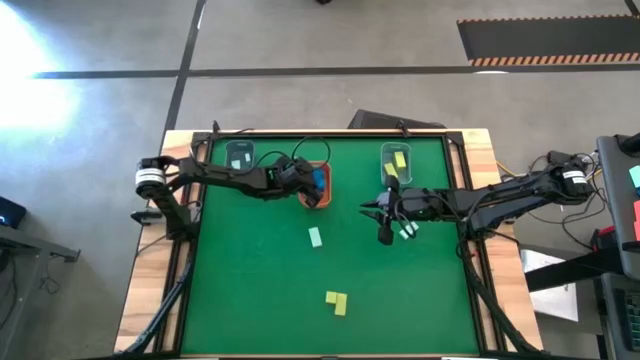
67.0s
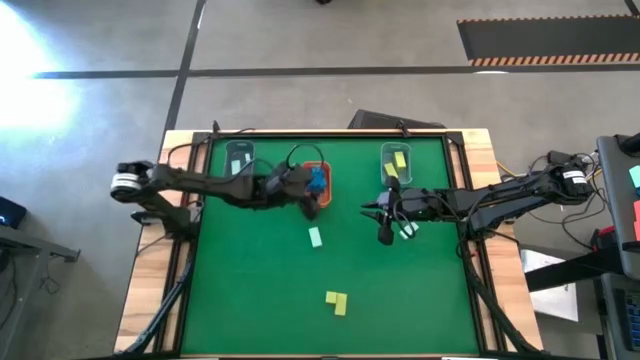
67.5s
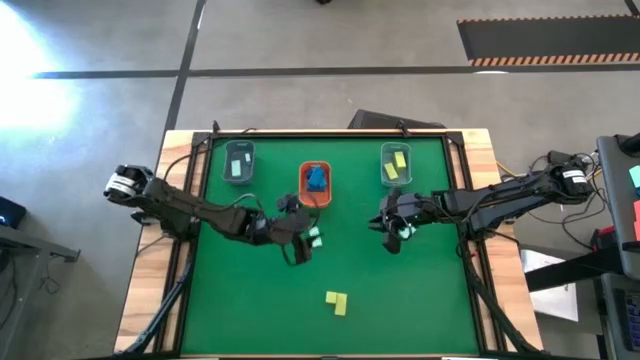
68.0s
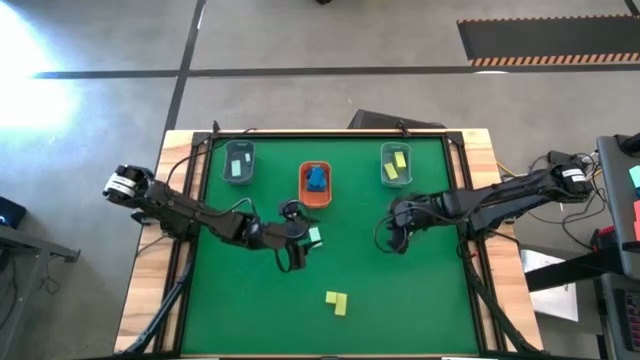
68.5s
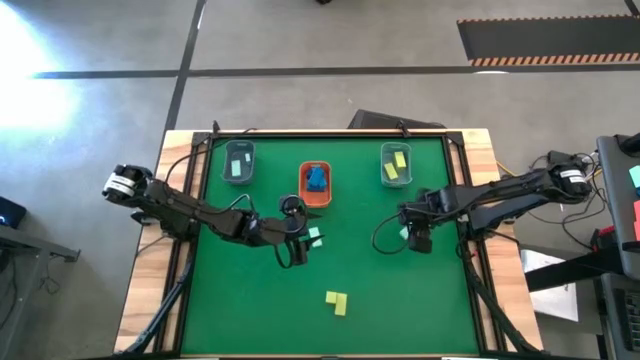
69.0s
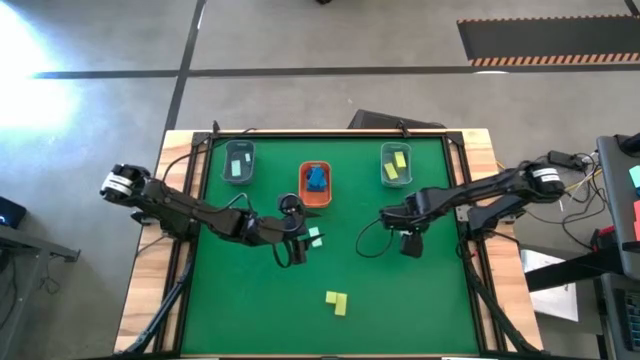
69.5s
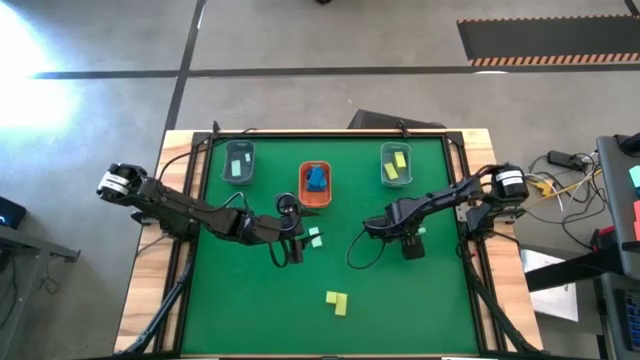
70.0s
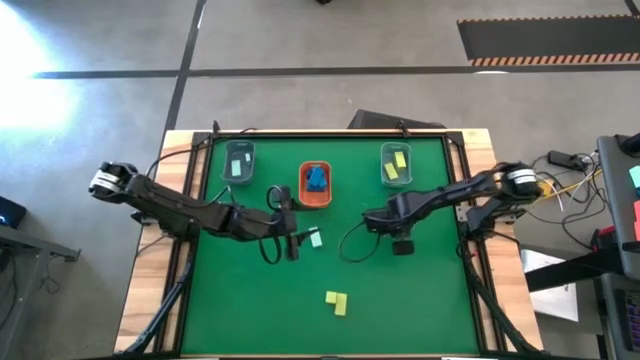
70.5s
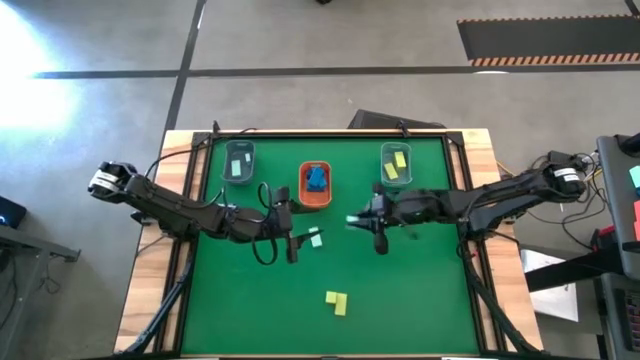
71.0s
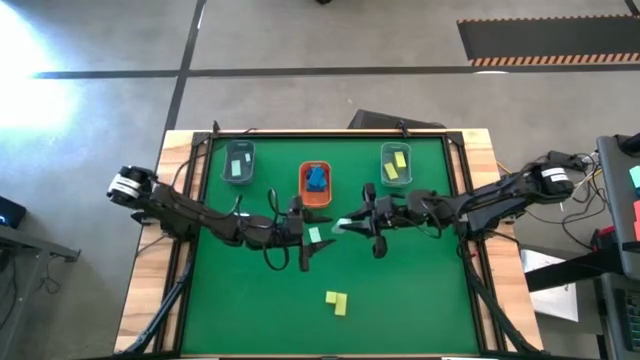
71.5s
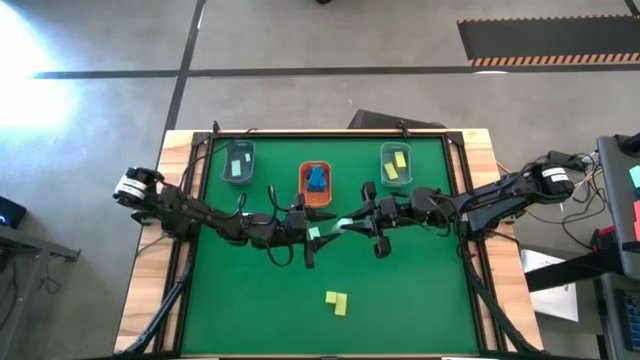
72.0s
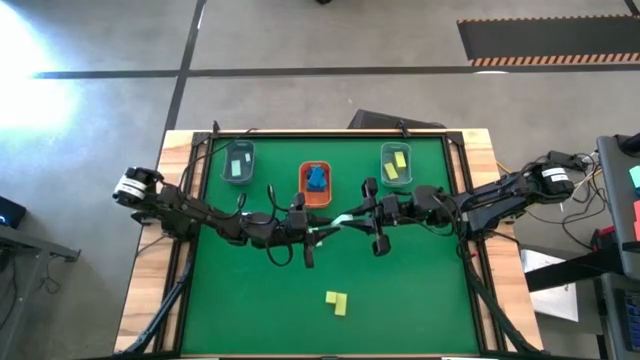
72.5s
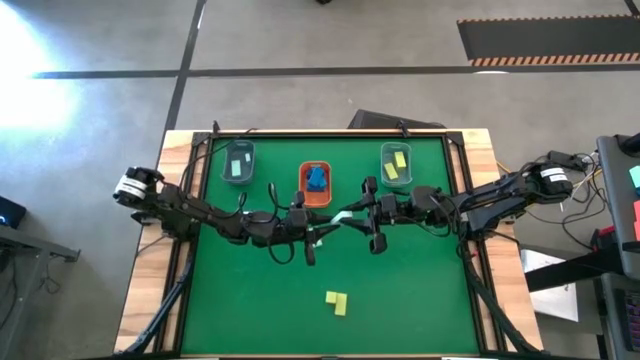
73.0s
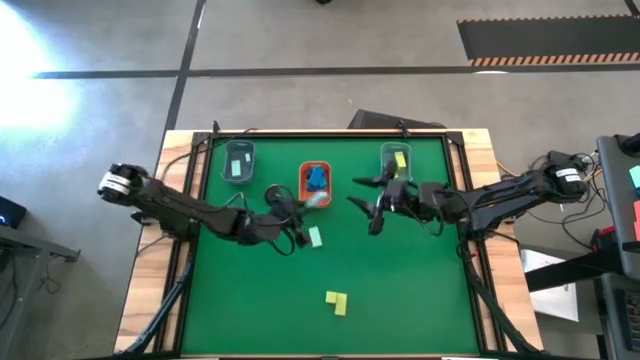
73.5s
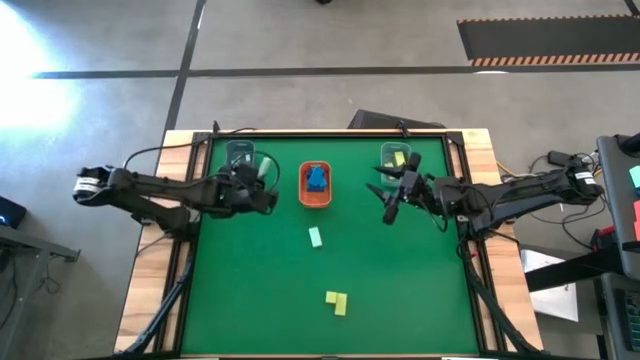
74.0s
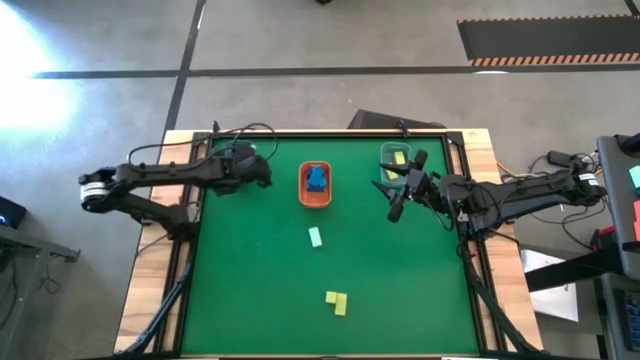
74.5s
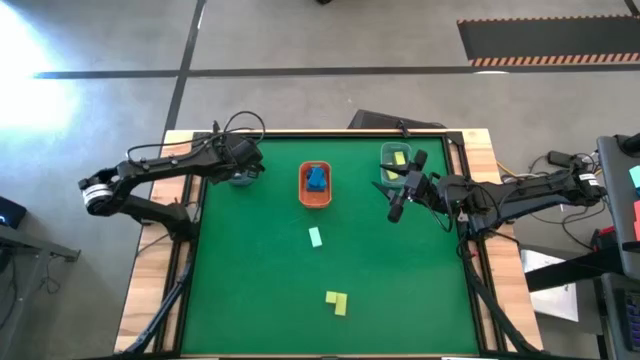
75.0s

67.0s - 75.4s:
Task: Sort & place blocks by color
Put the light blue wooden block into the gray bin

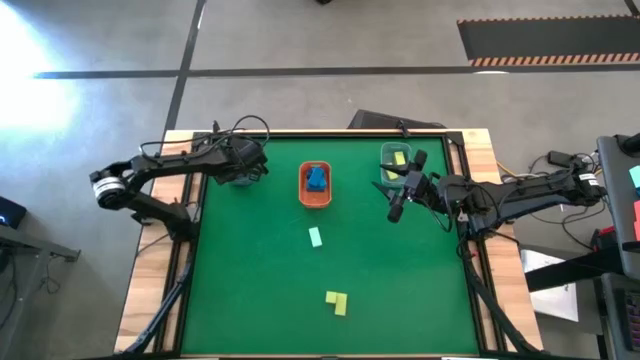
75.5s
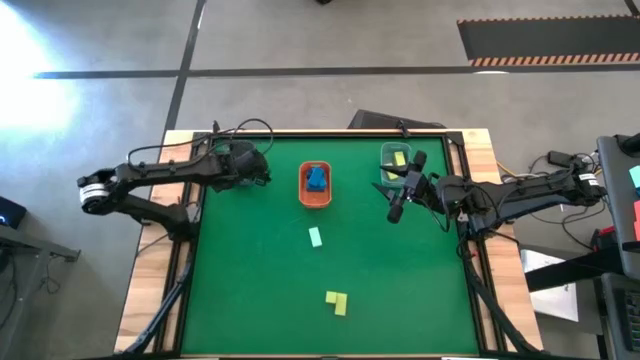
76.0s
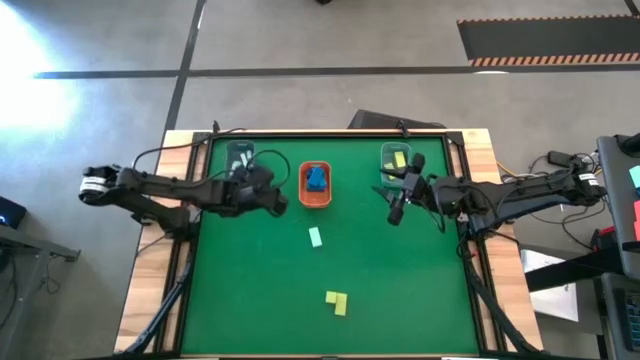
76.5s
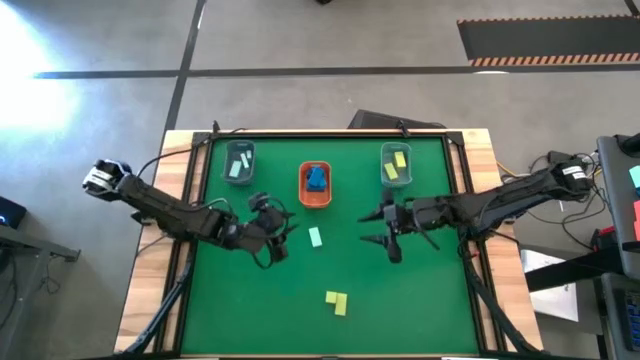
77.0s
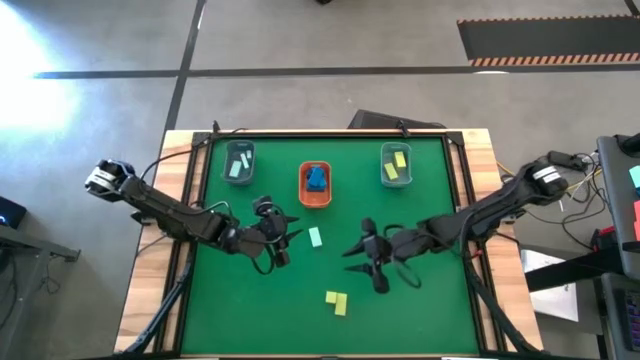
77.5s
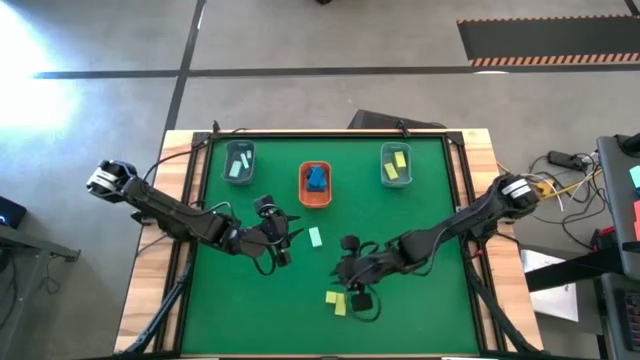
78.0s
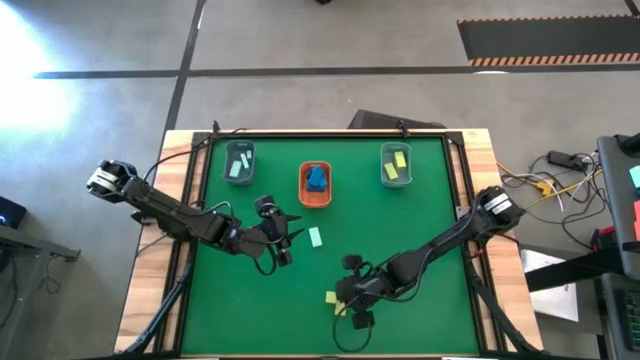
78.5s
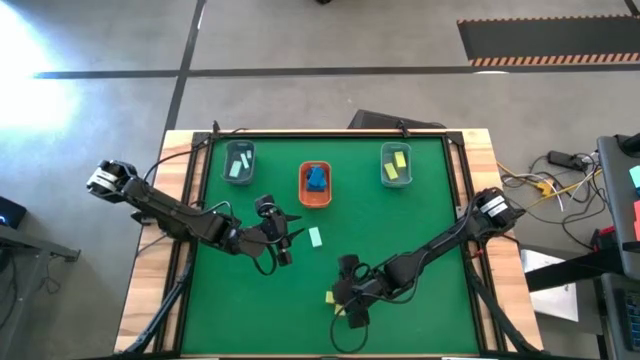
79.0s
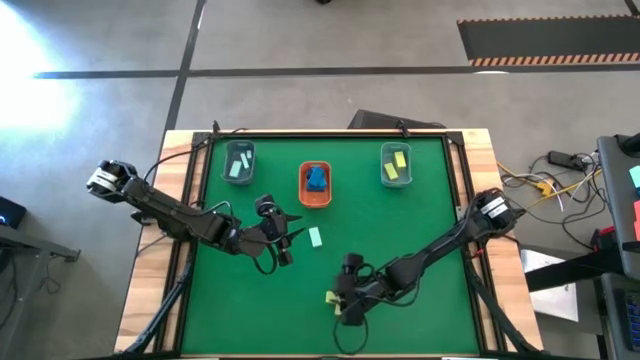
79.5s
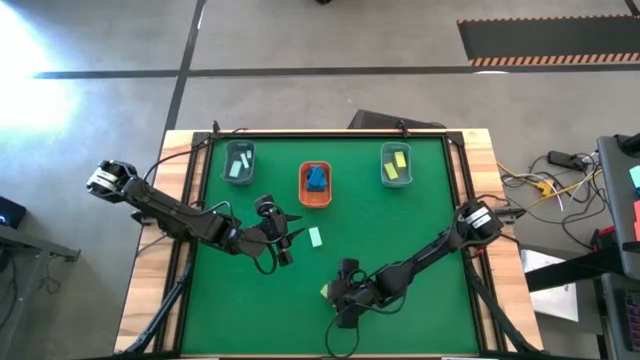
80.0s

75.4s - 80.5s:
Put the yellow wooden block into the green bin

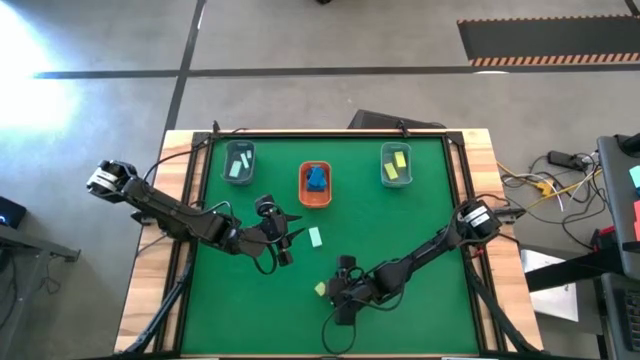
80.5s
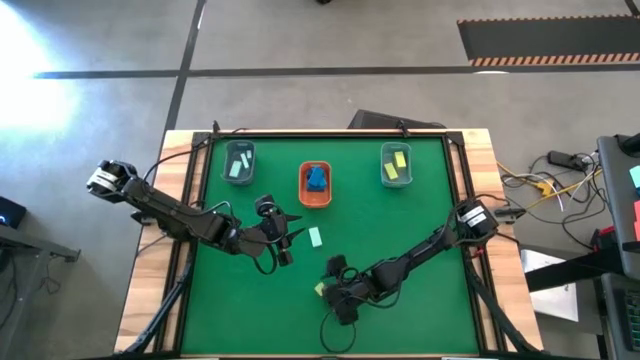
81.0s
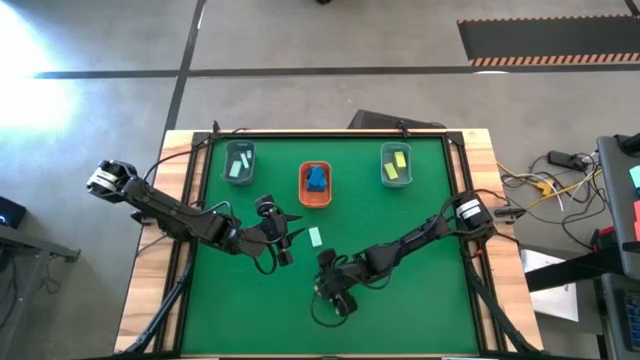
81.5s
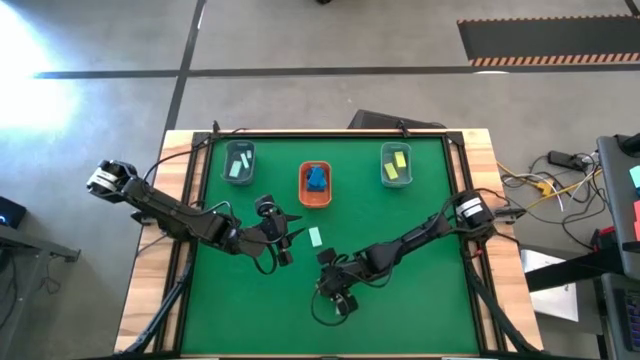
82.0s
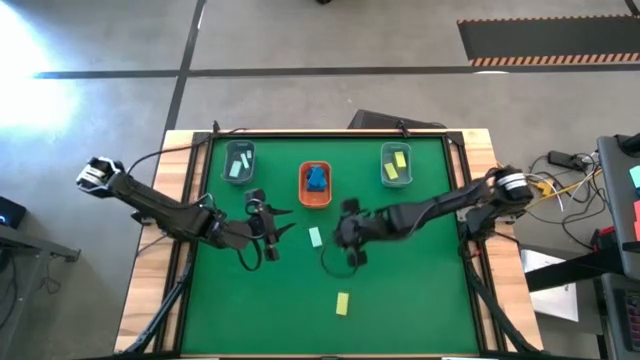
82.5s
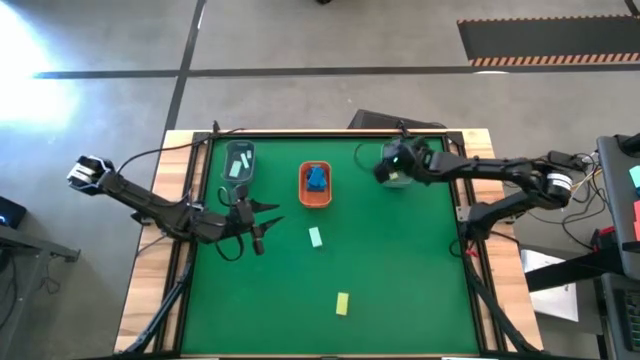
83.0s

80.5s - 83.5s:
Put the yellow wooden block into the green bin

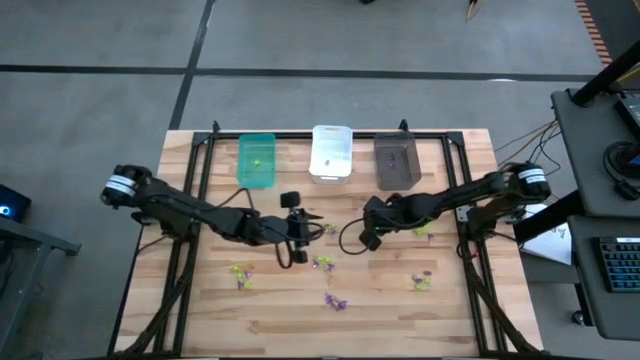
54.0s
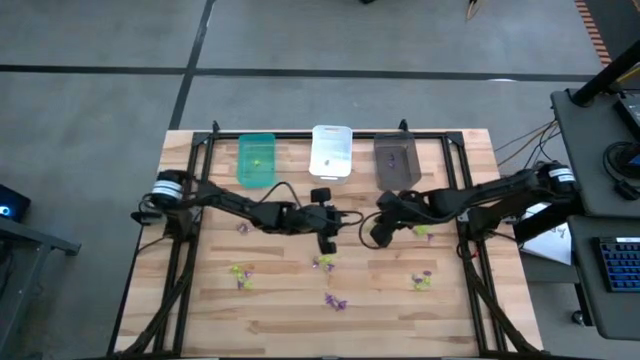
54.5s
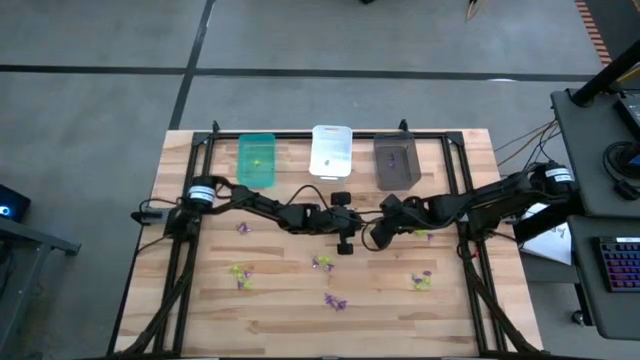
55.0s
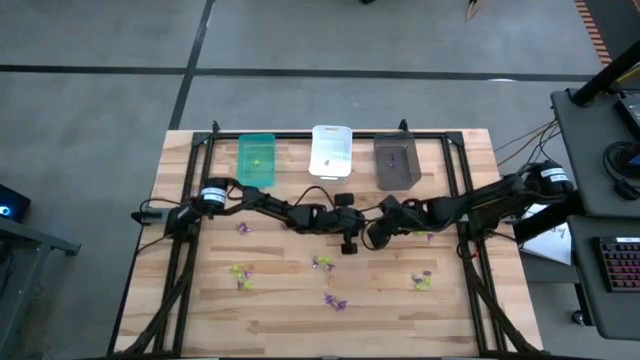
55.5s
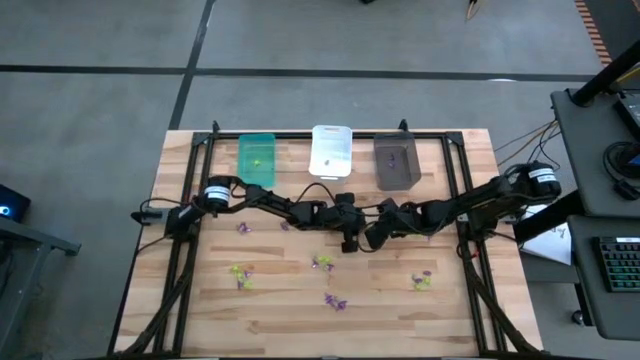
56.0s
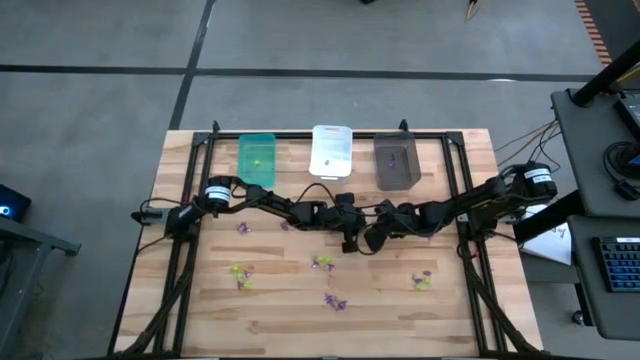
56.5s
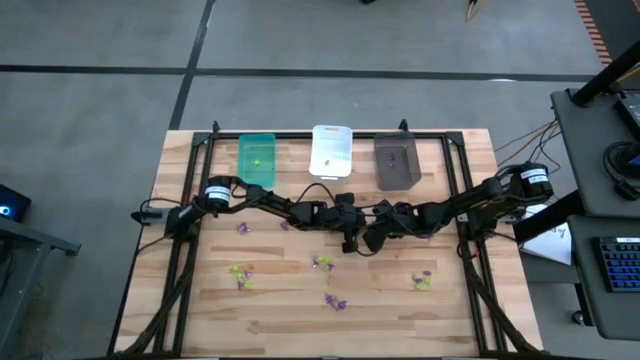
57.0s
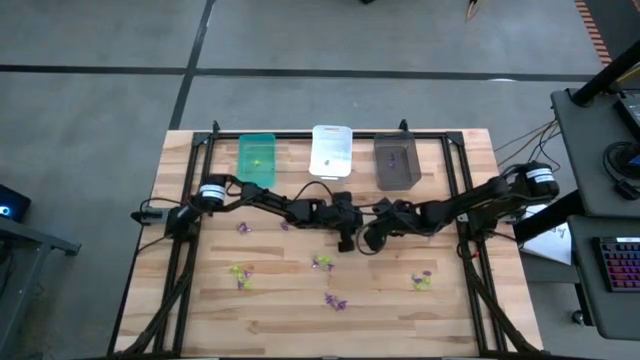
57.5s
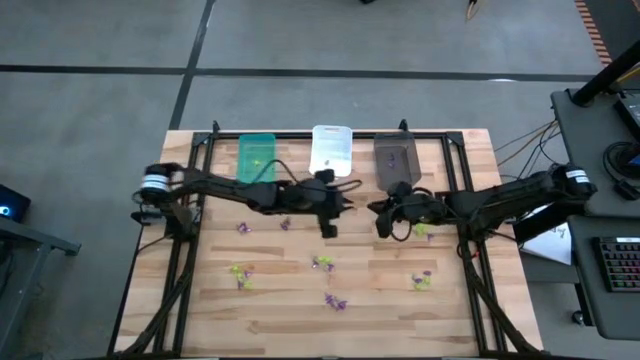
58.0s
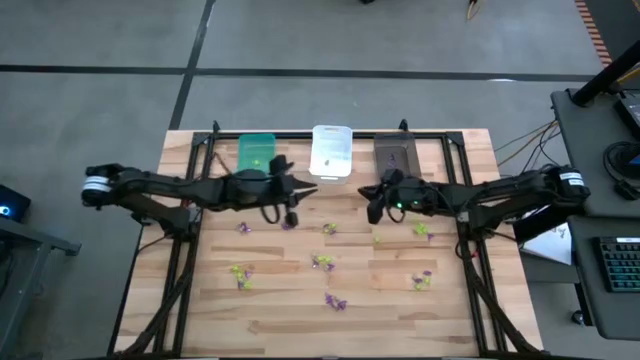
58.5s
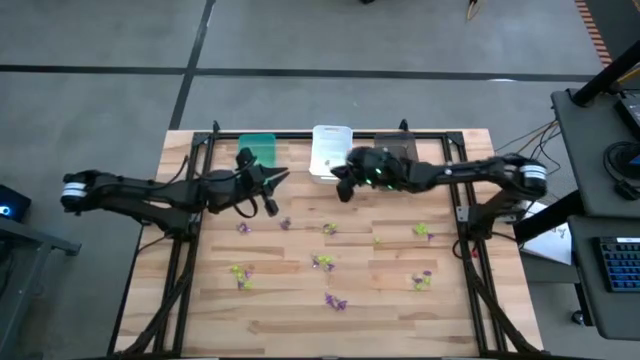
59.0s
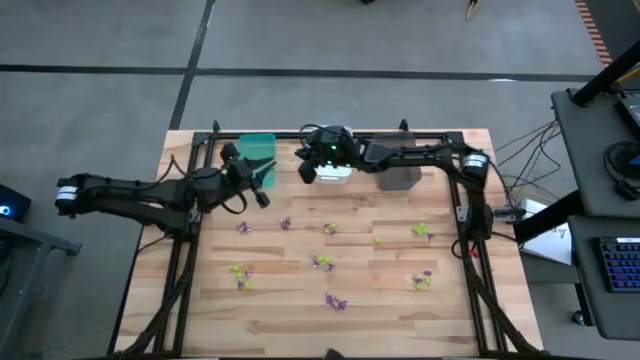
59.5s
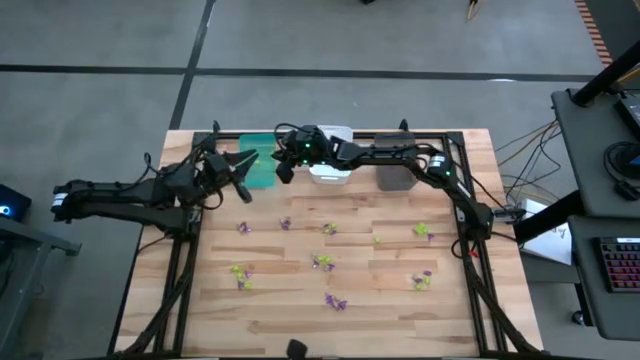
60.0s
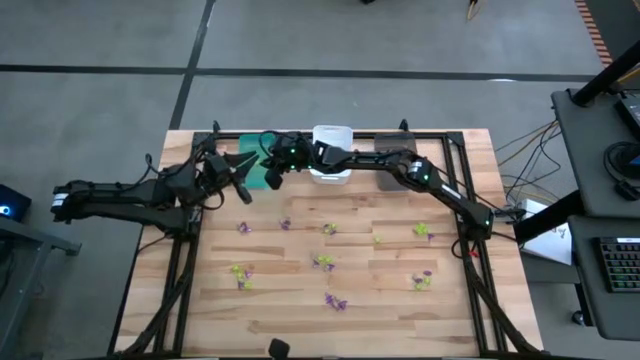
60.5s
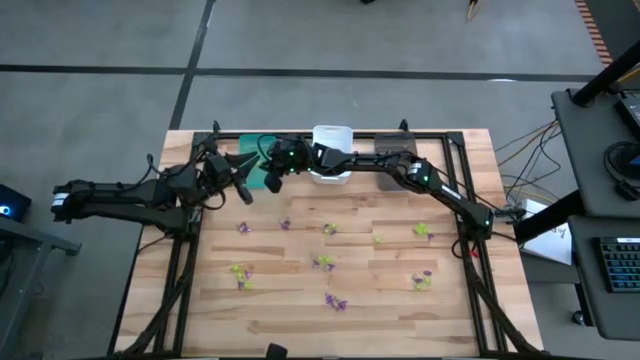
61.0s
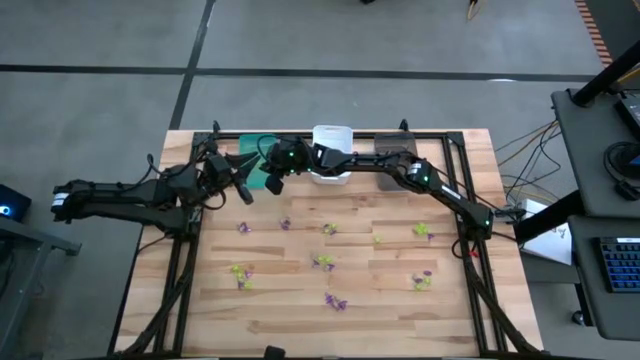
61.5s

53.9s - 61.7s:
Task: Sort Halloween decoration
Put the green spider toy into the blue bin
